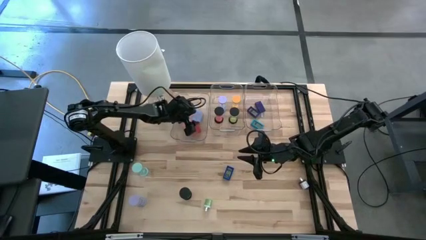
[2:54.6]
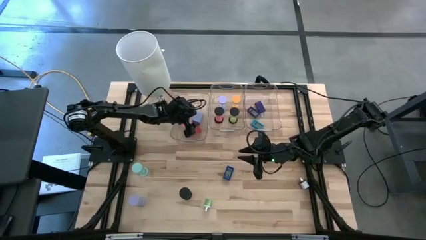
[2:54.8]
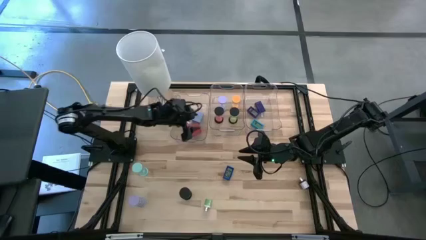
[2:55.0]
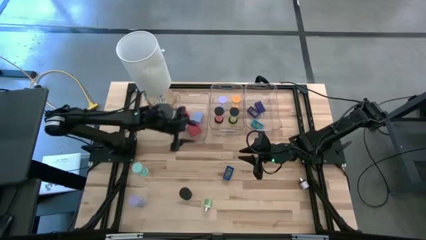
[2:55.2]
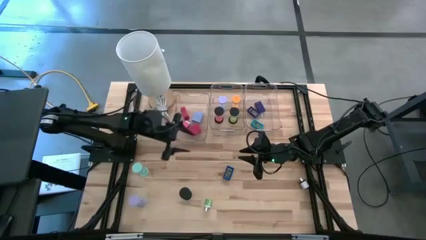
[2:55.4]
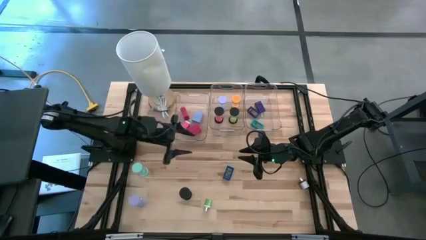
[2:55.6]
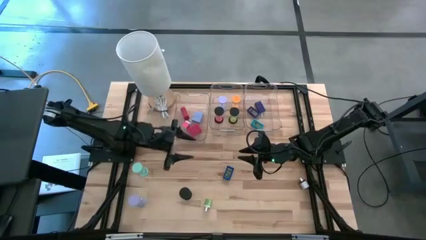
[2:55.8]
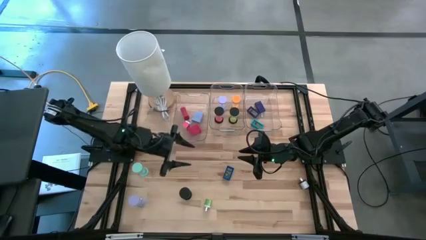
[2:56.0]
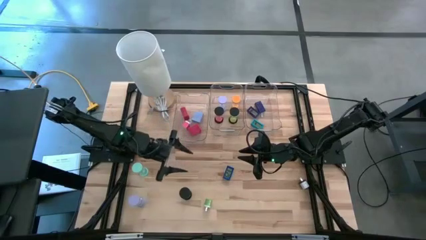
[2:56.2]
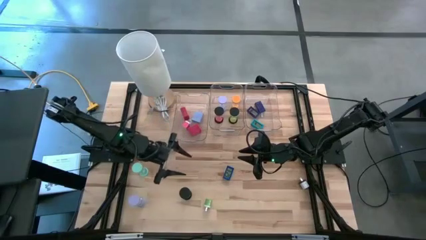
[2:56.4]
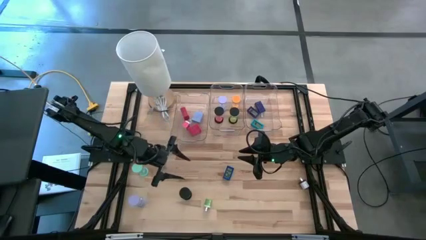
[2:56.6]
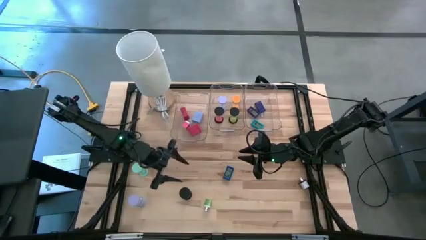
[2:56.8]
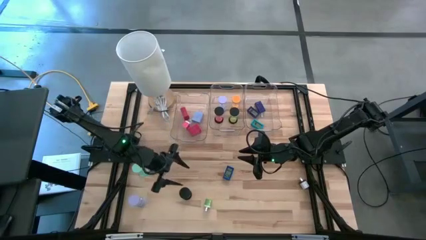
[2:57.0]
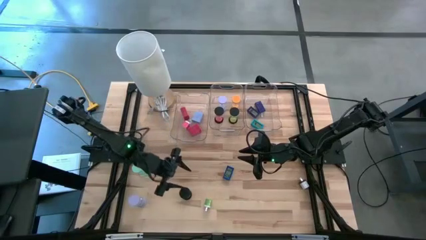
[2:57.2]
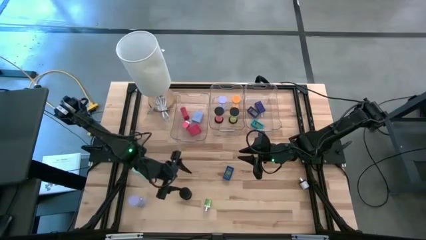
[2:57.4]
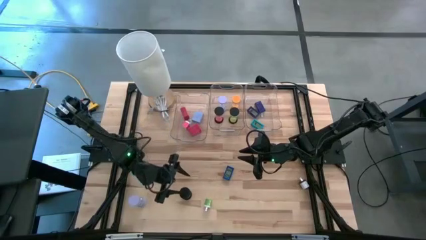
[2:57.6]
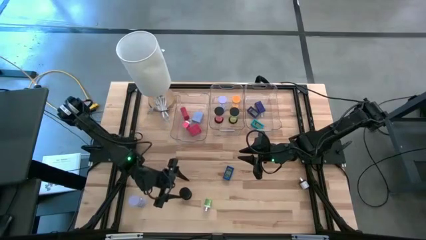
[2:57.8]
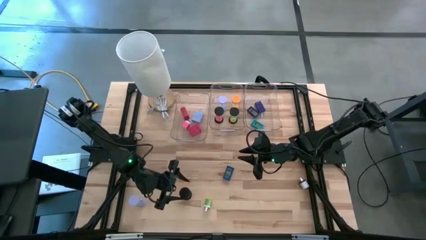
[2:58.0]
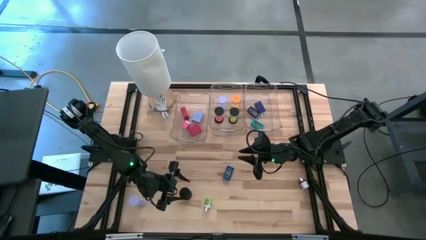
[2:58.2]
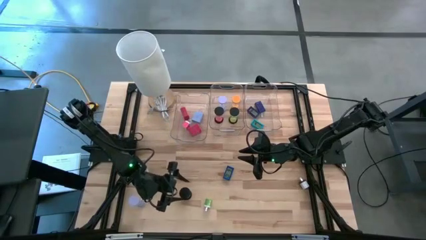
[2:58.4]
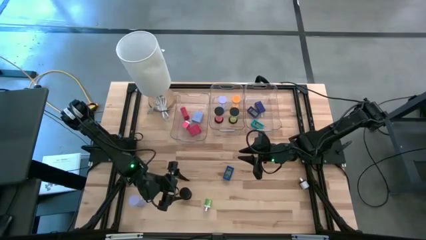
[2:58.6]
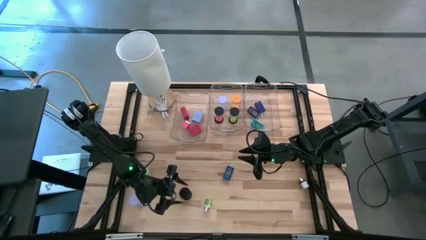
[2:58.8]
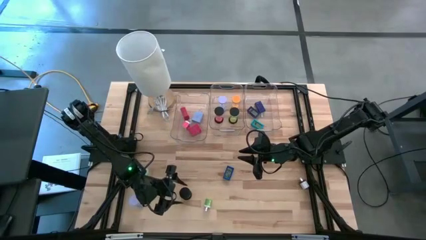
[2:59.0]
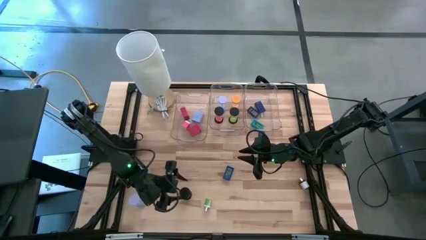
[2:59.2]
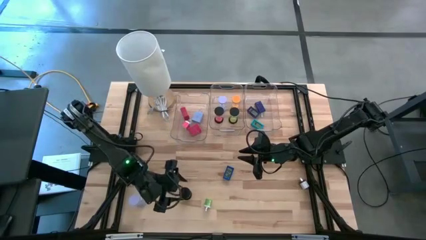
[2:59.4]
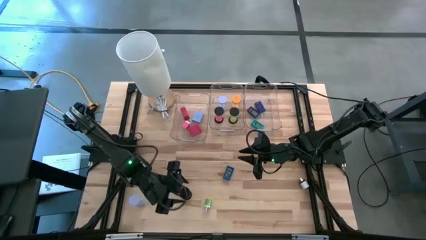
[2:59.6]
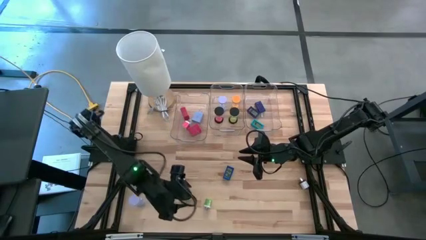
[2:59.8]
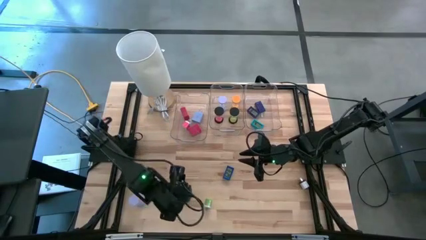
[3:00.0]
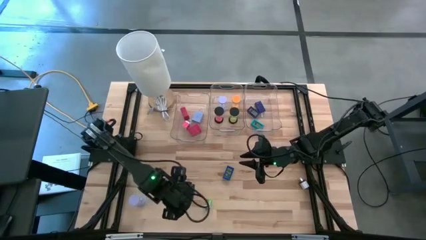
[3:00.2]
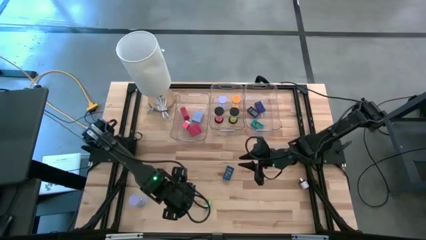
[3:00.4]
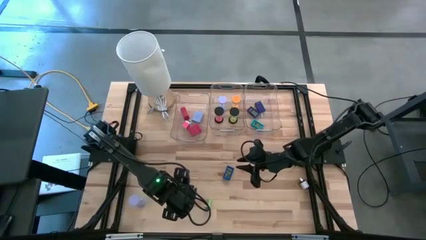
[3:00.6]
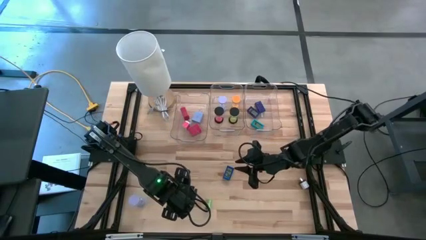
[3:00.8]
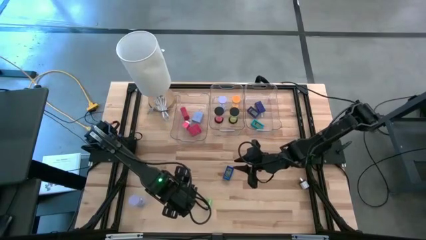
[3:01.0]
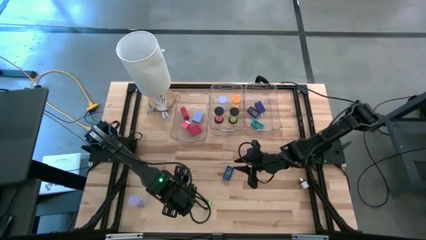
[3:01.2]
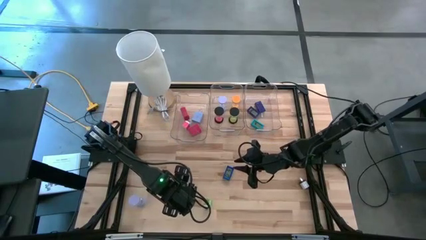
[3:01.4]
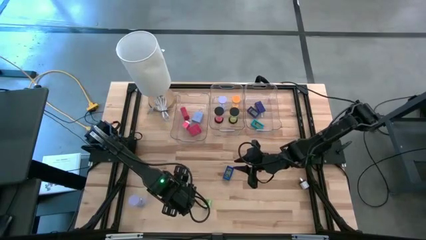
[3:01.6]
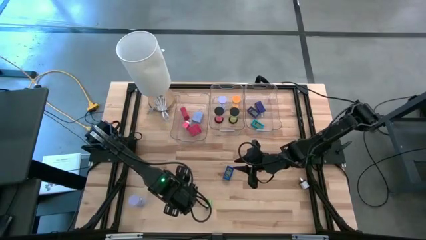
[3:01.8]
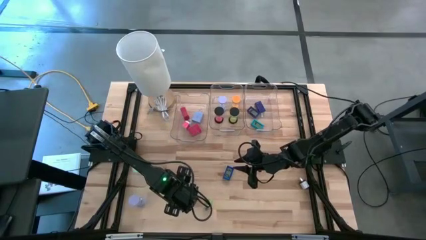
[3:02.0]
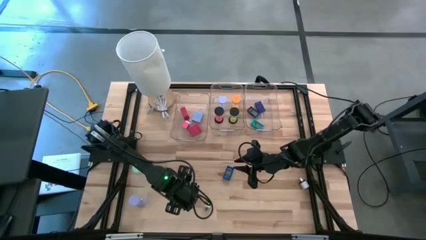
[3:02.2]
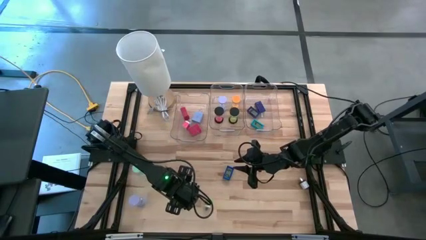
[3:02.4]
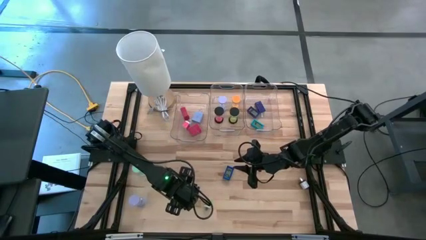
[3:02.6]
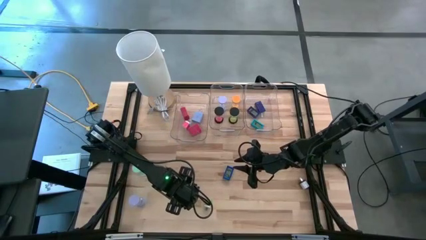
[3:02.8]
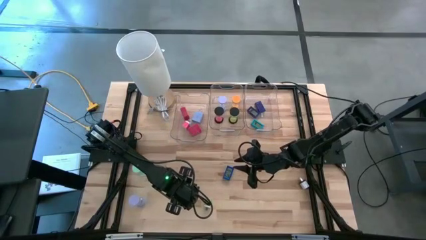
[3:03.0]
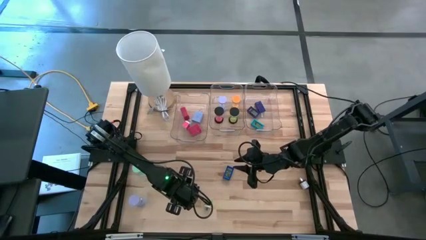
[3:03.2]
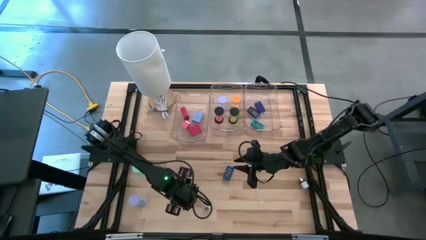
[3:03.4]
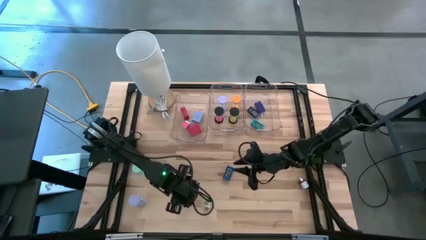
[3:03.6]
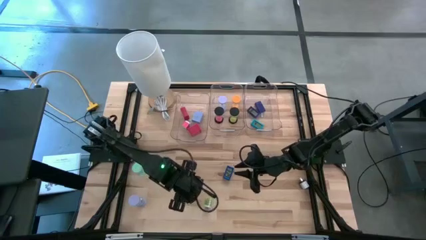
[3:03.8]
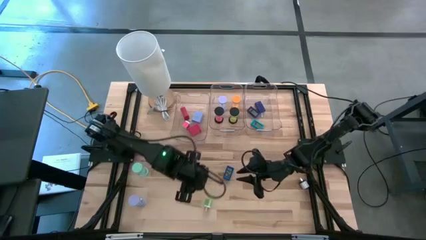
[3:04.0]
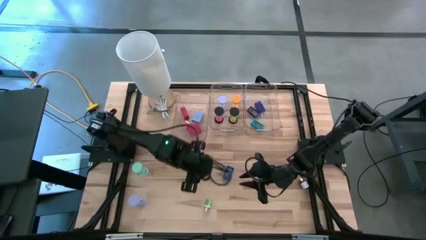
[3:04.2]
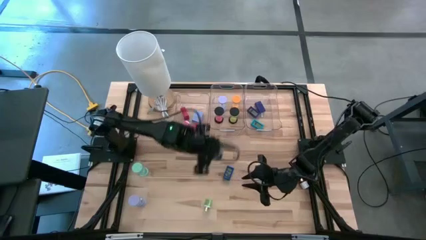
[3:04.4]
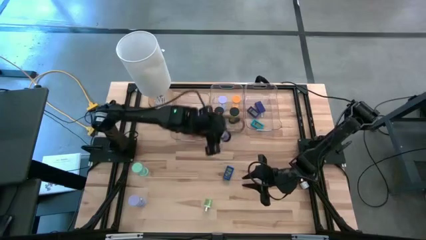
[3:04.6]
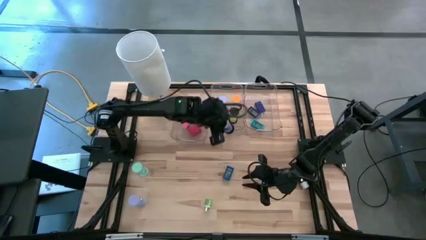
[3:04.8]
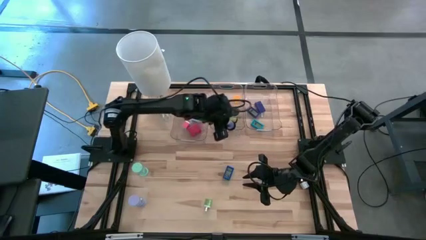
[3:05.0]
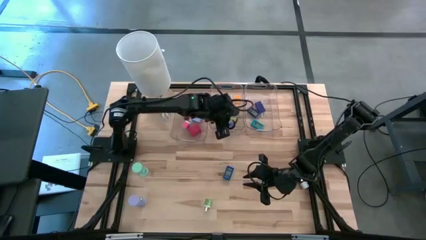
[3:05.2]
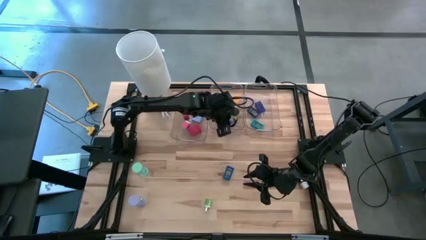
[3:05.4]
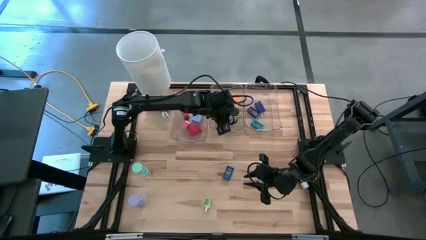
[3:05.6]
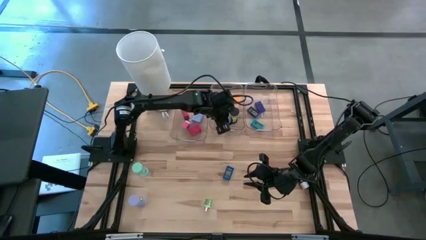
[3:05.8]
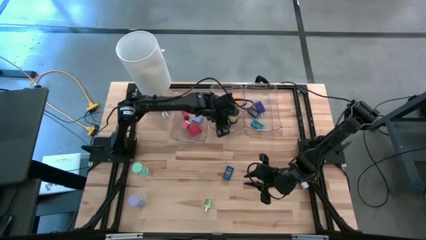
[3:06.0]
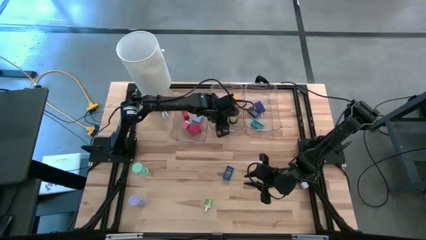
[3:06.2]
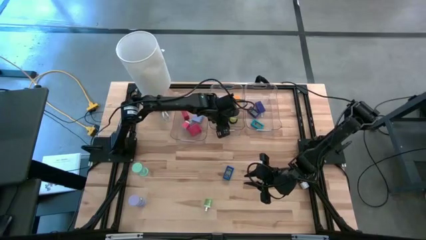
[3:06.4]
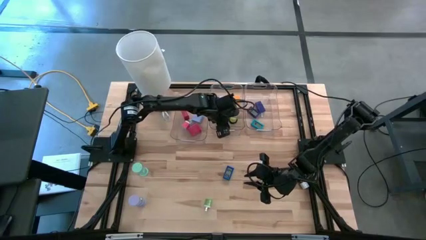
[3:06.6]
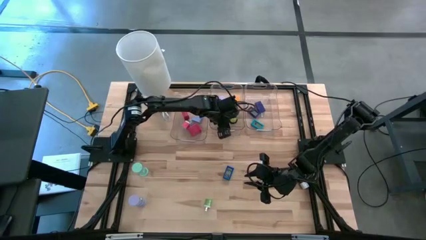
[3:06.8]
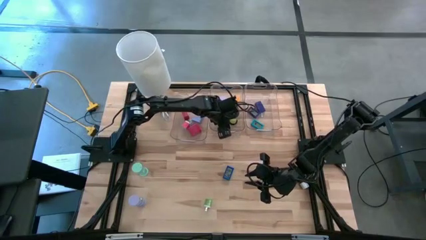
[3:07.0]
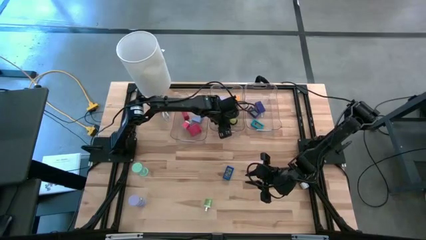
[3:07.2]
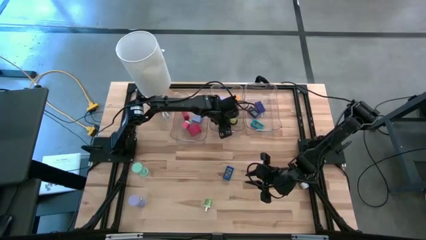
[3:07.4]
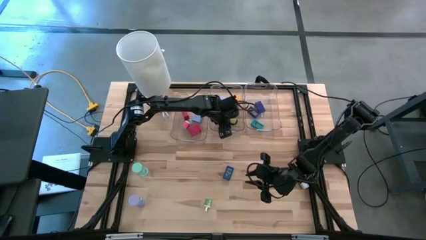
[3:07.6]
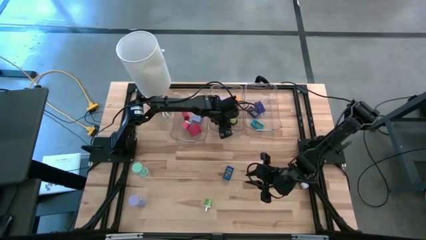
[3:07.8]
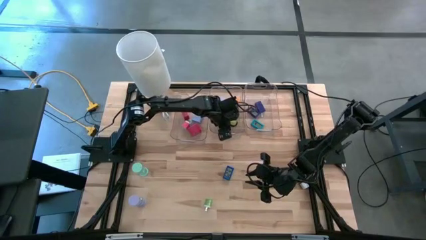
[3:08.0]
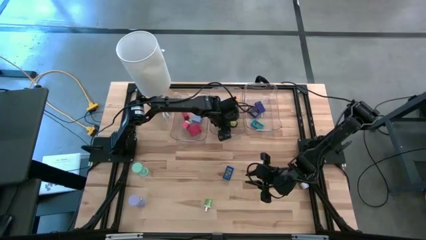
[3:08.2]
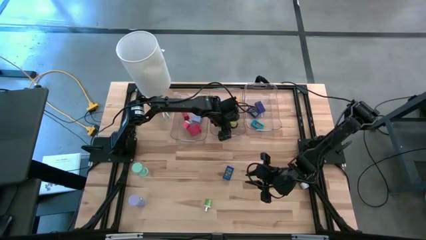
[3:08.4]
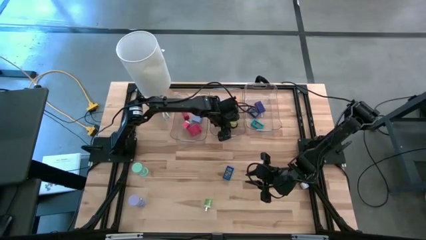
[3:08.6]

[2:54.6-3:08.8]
Task: Pick & Place Office items
Put the blue hourglass into the middle transparent bin
